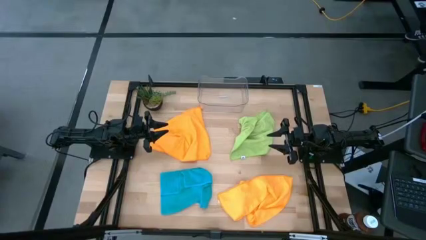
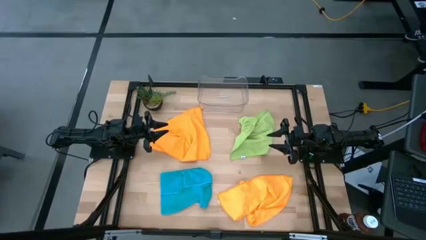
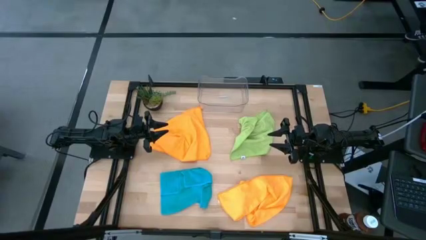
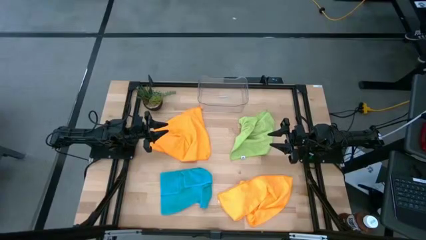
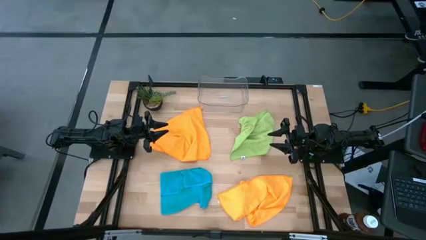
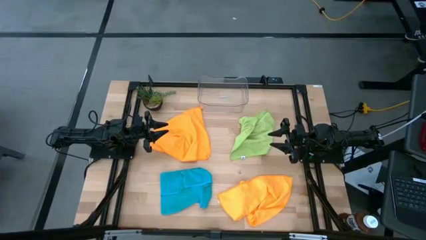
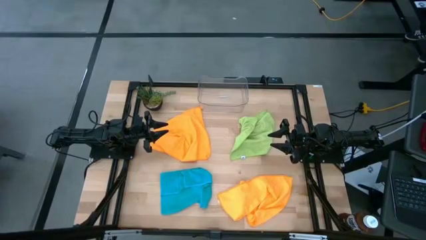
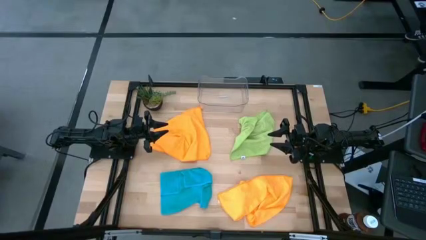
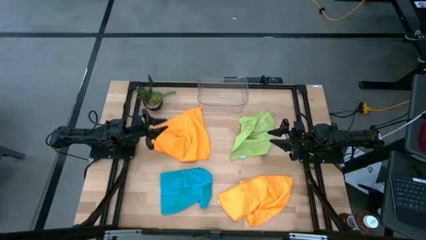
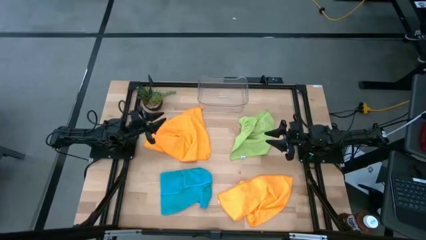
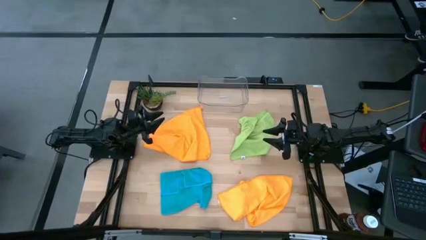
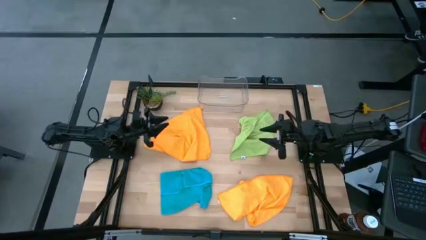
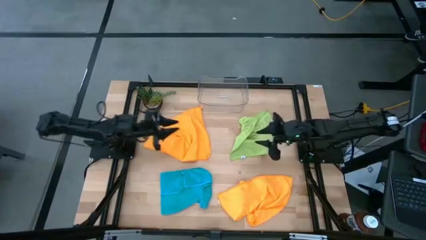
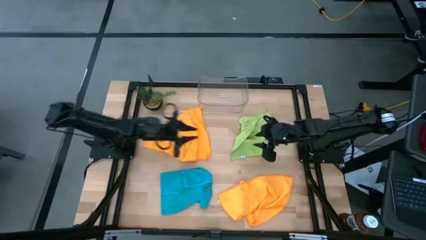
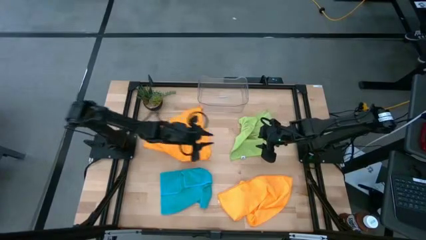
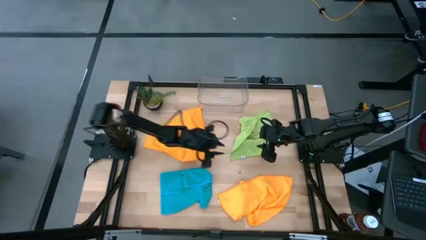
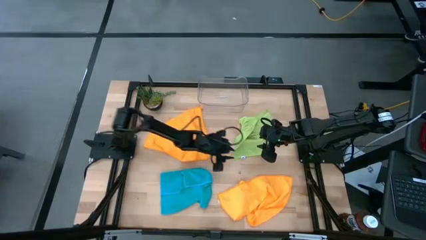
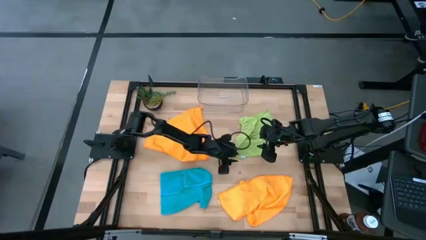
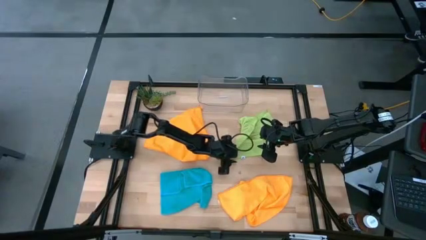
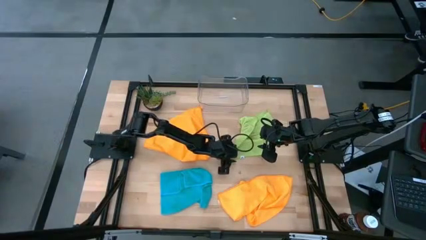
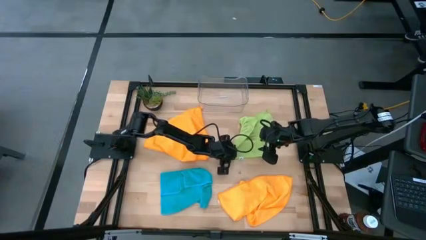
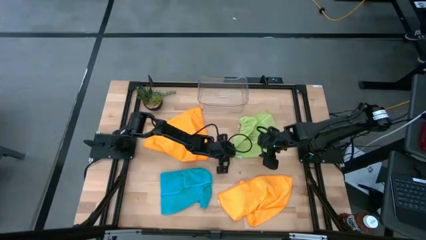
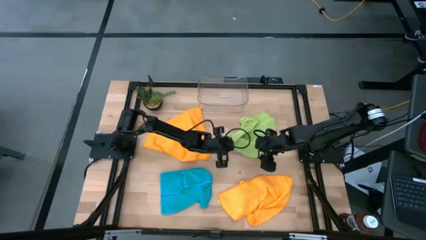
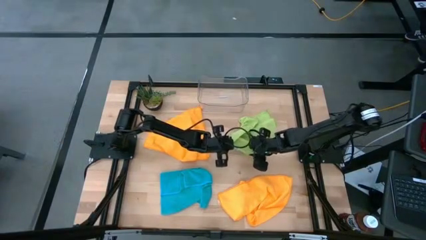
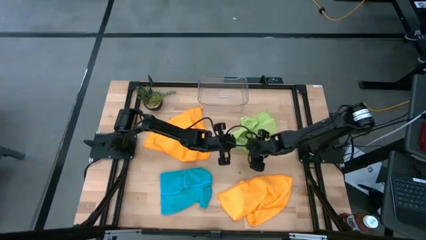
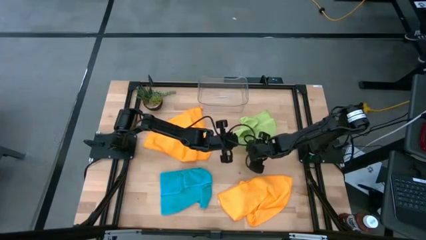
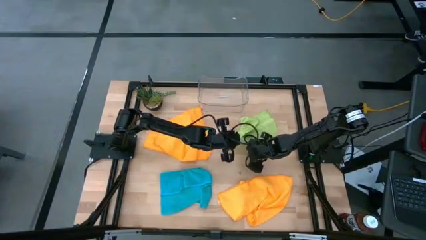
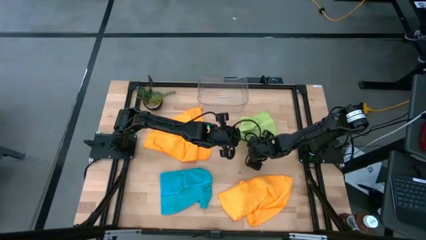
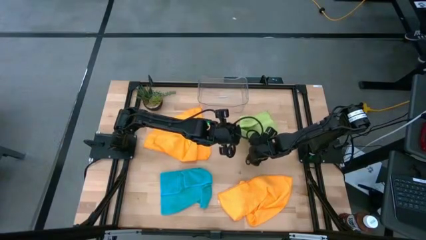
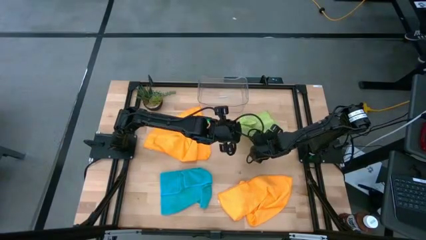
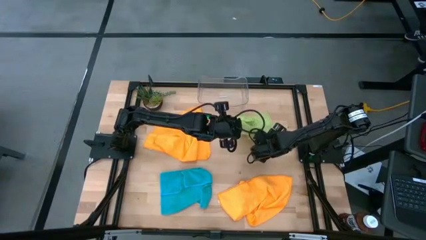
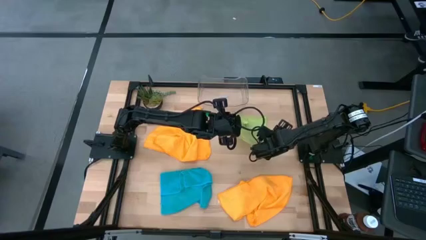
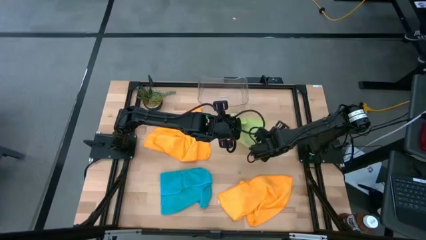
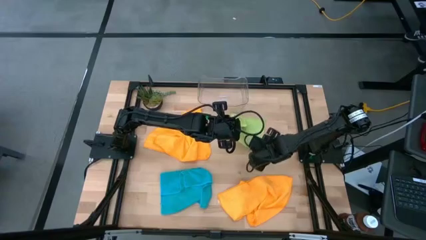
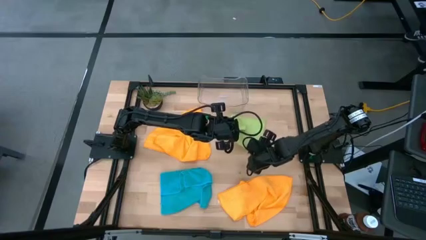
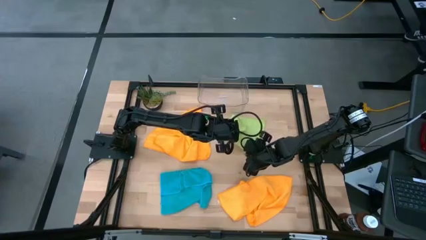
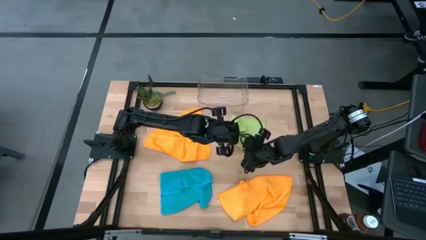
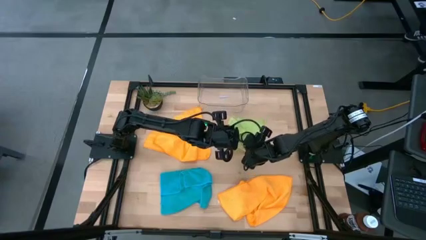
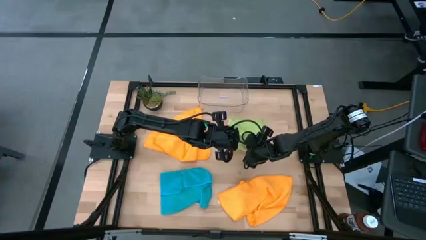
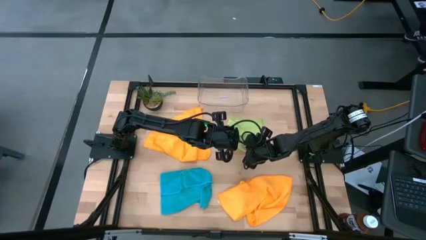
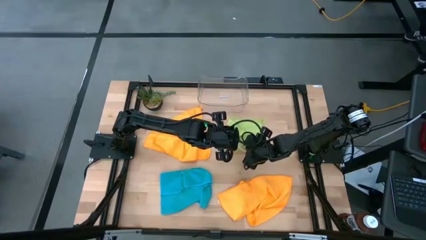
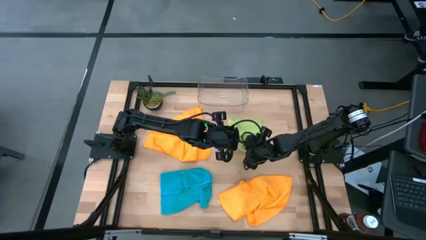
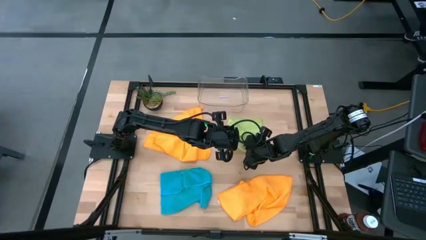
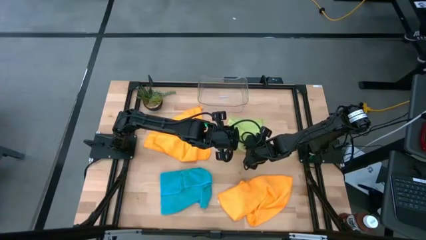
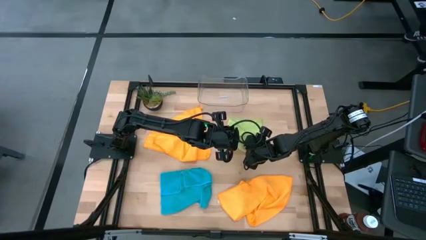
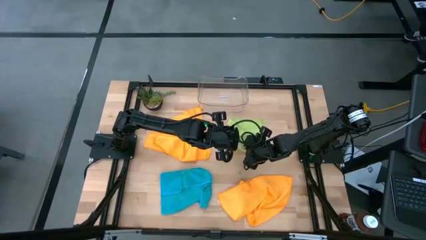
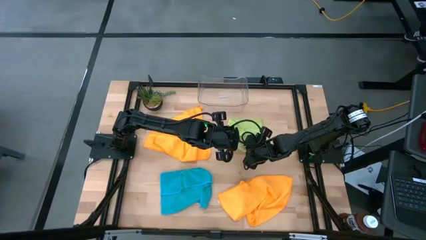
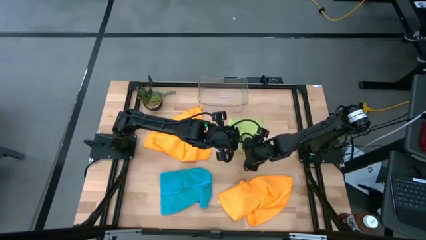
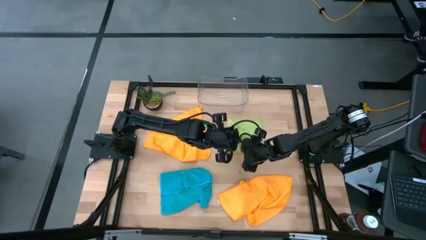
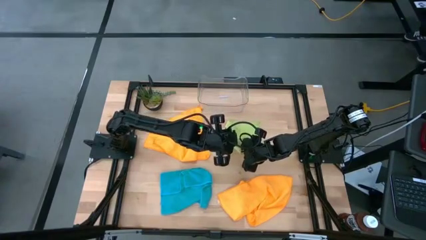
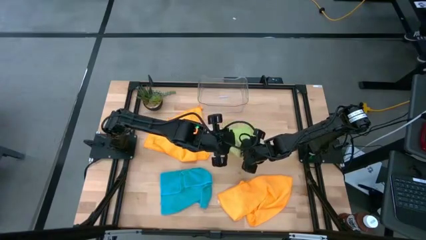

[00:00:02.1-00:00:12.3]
Task: Fold microfiber towels
Fold the green microfiber cloth
